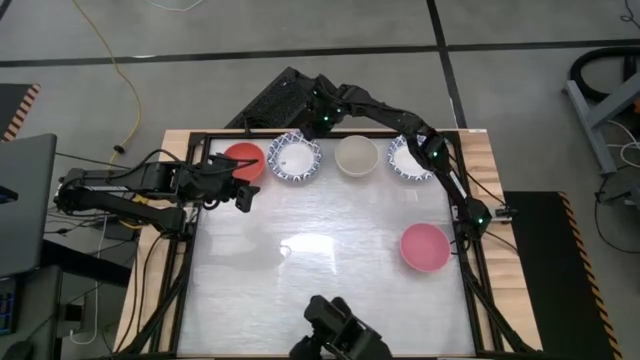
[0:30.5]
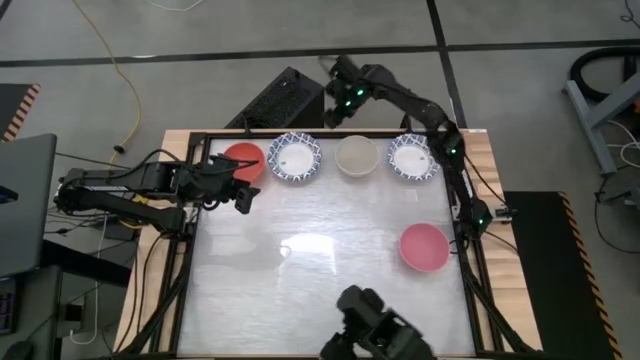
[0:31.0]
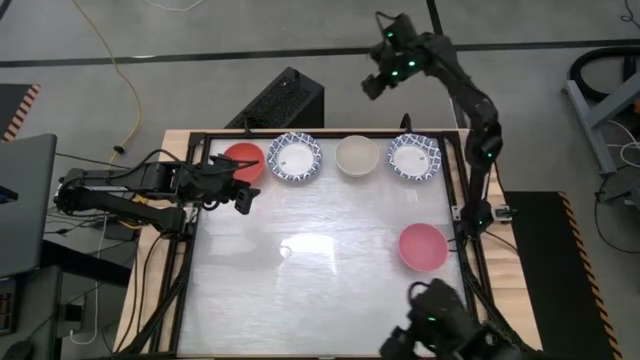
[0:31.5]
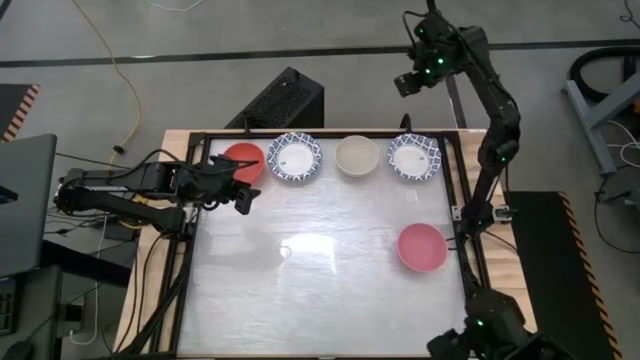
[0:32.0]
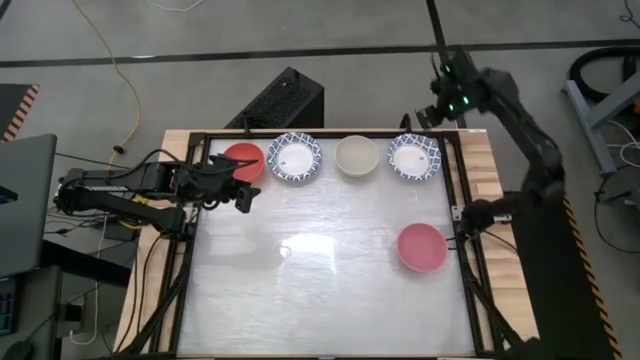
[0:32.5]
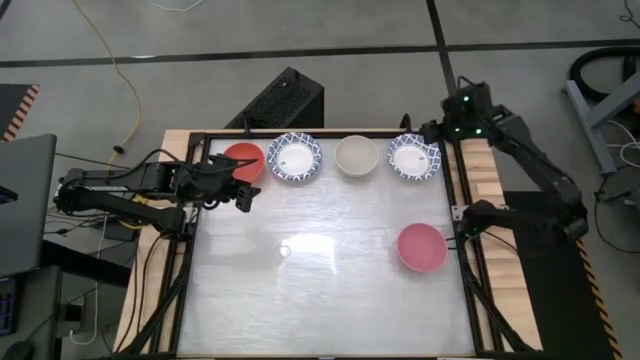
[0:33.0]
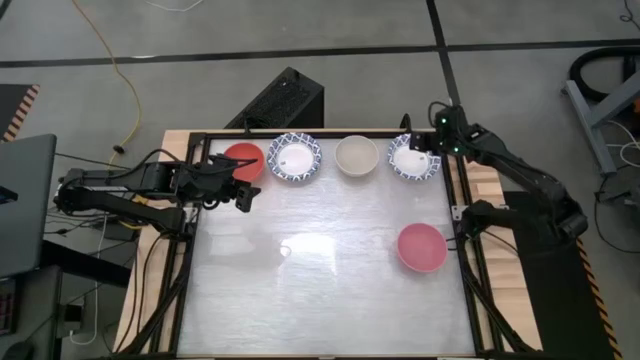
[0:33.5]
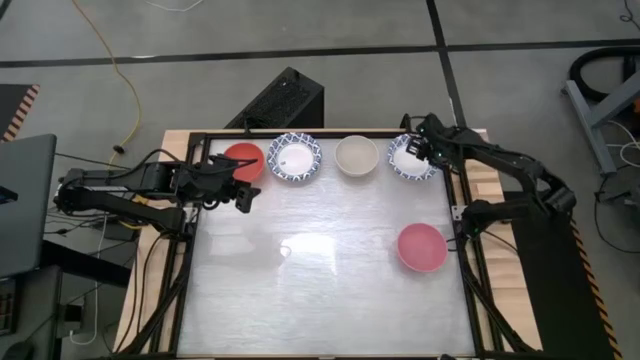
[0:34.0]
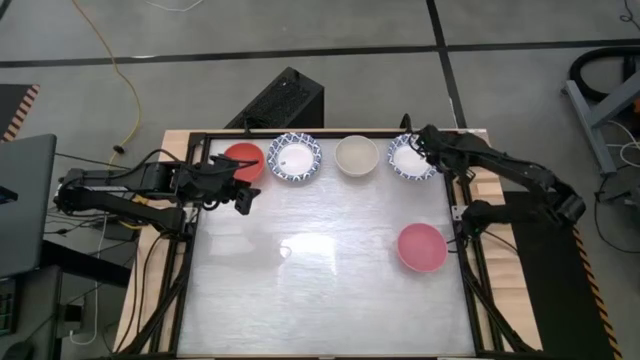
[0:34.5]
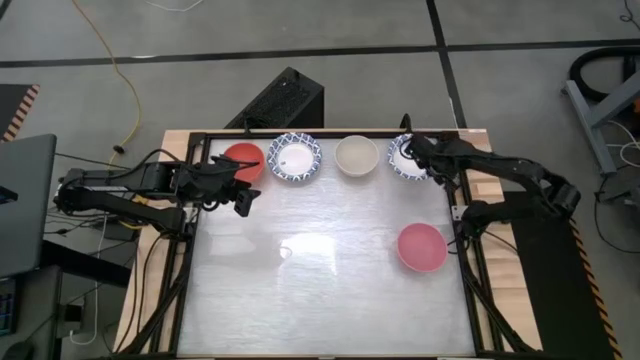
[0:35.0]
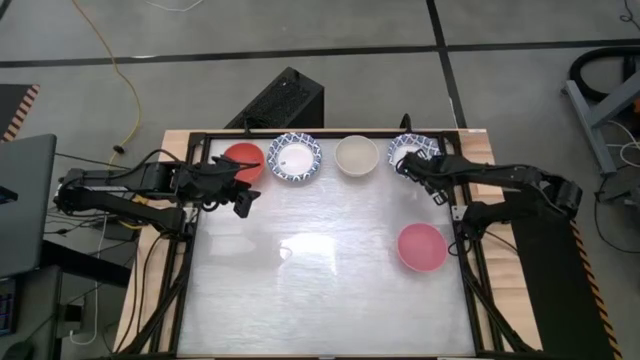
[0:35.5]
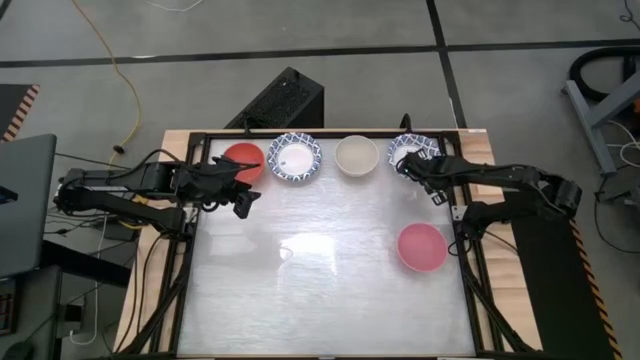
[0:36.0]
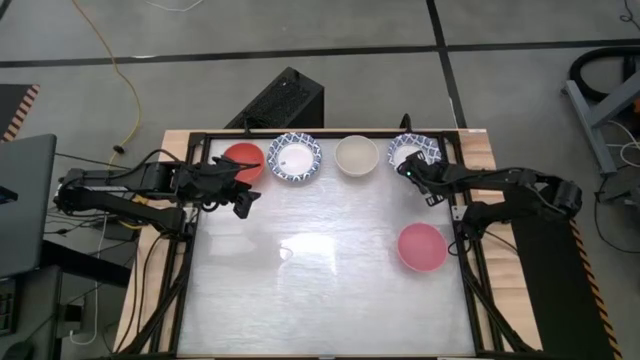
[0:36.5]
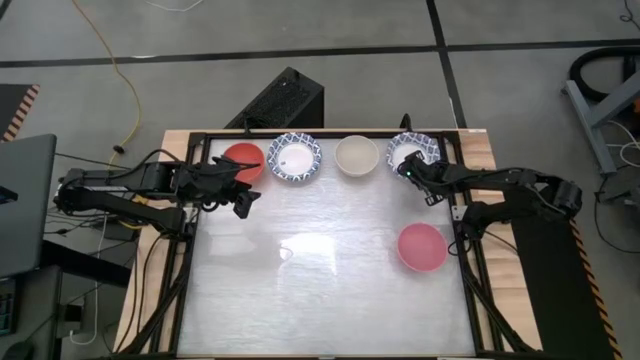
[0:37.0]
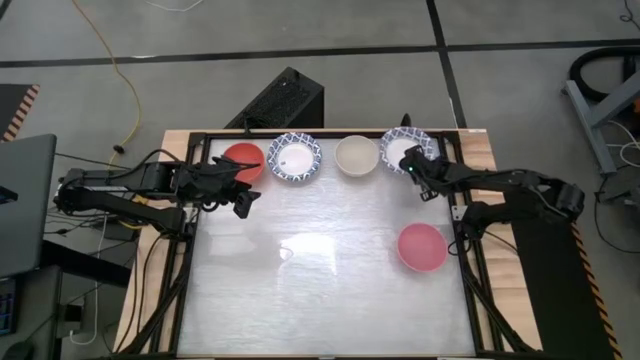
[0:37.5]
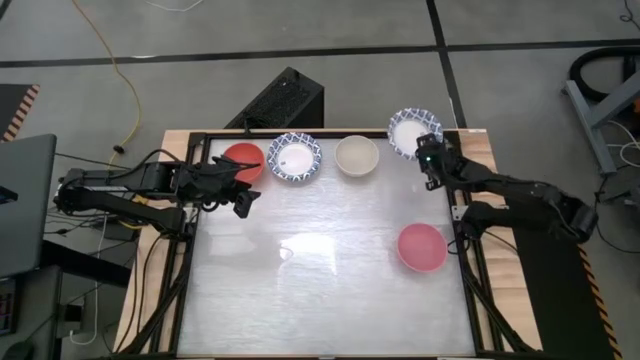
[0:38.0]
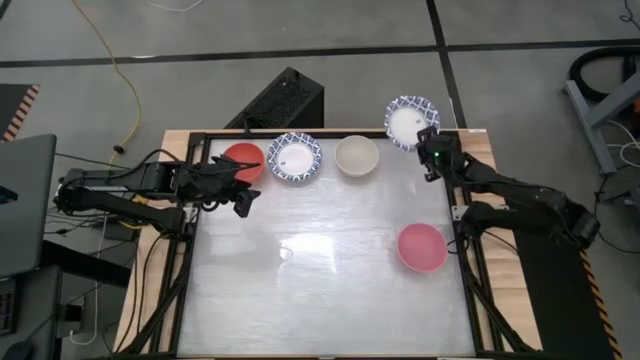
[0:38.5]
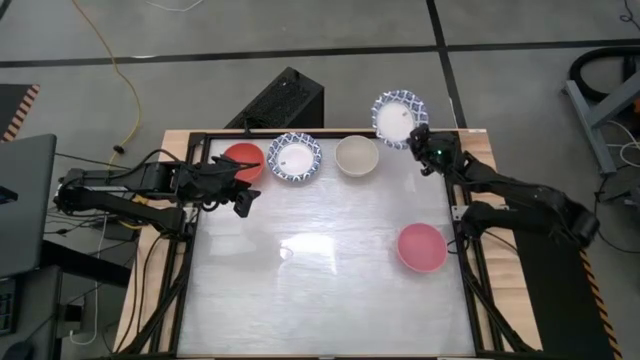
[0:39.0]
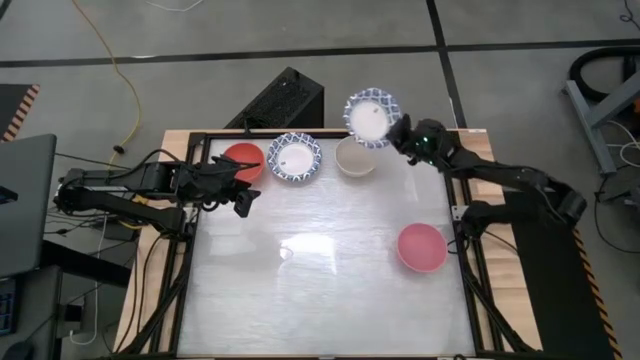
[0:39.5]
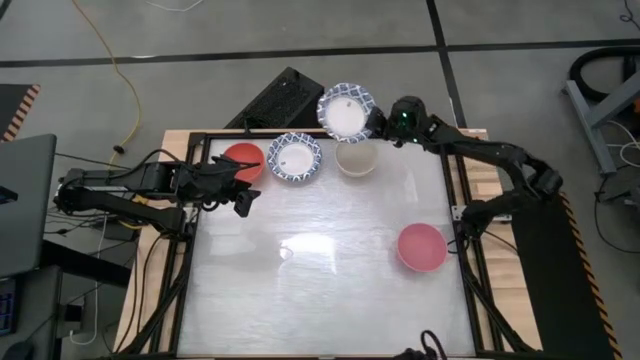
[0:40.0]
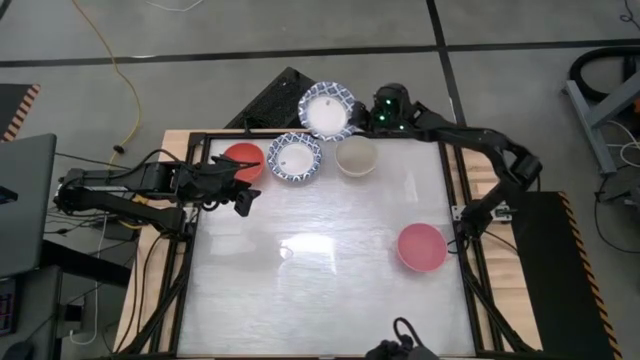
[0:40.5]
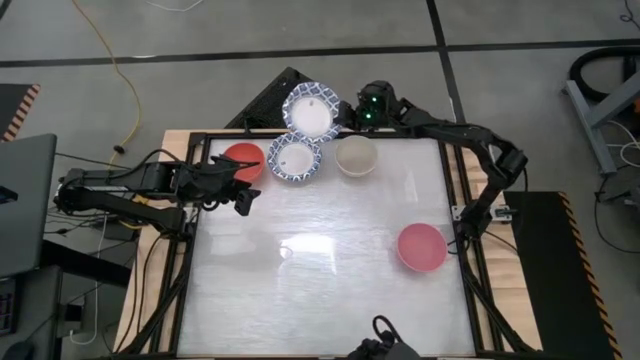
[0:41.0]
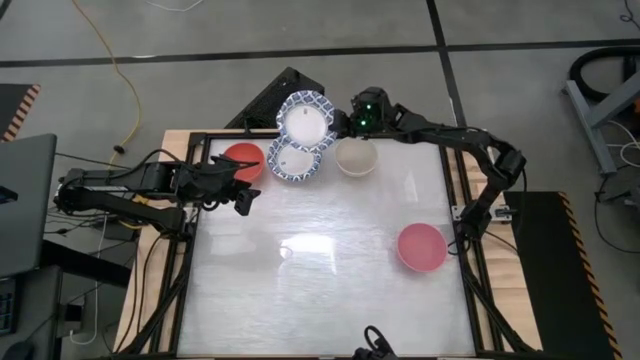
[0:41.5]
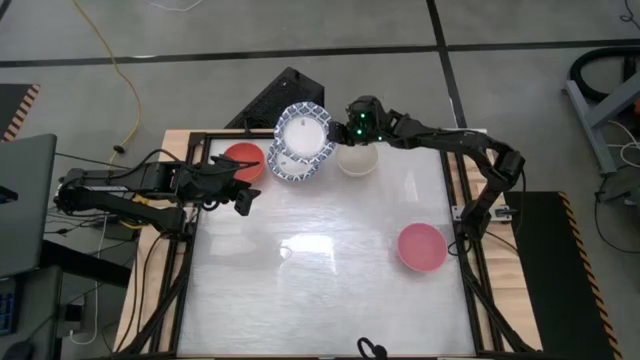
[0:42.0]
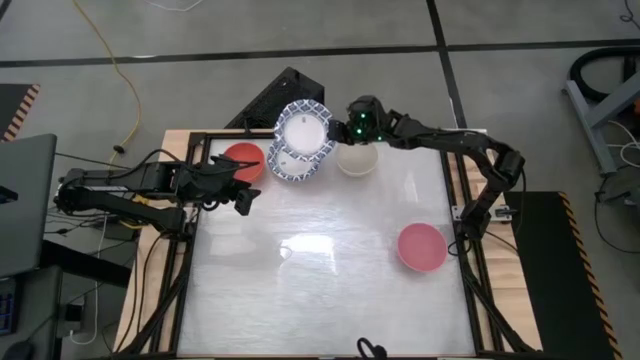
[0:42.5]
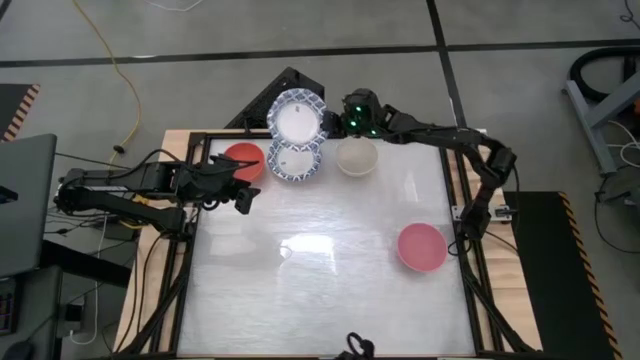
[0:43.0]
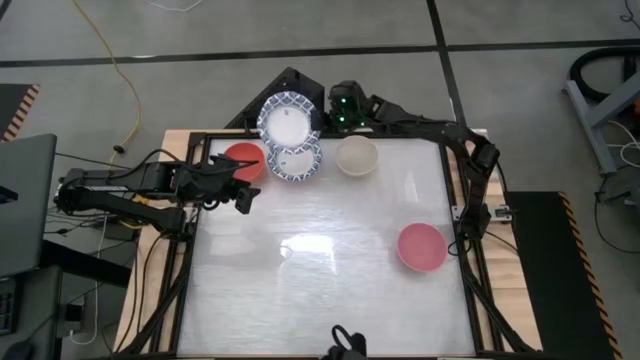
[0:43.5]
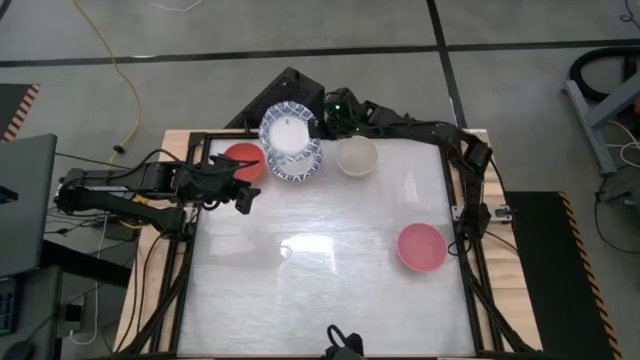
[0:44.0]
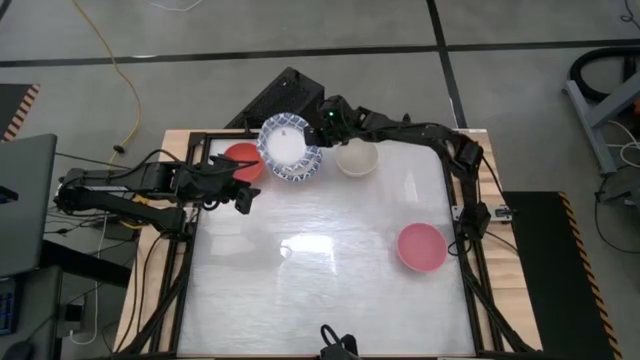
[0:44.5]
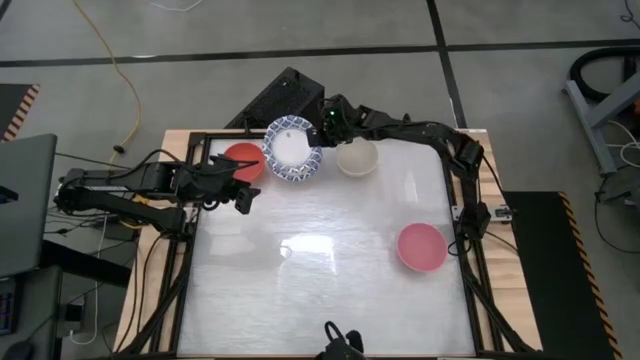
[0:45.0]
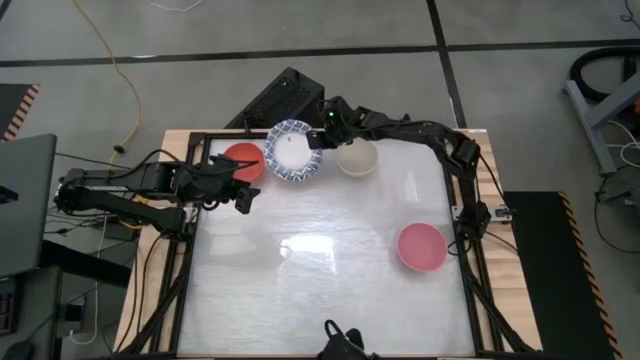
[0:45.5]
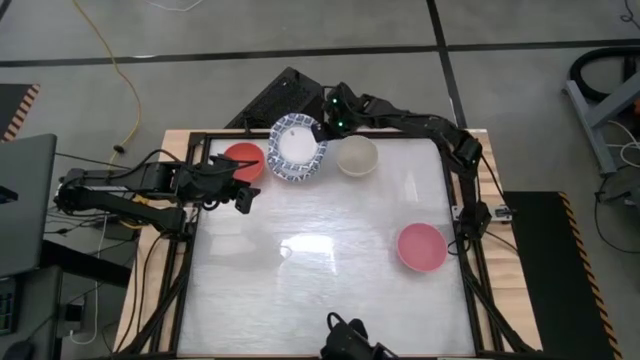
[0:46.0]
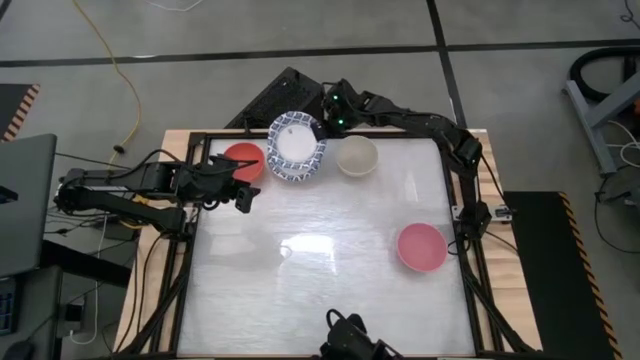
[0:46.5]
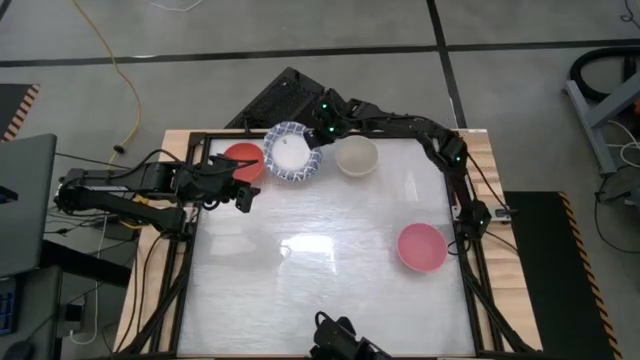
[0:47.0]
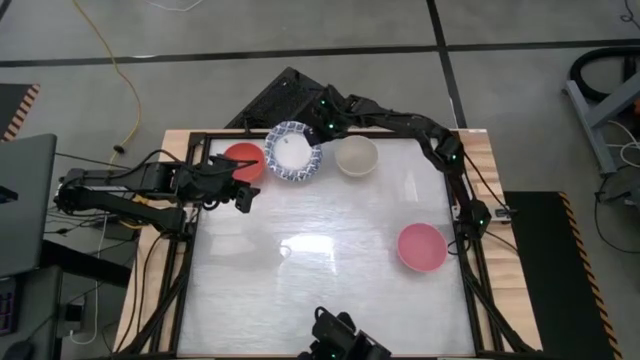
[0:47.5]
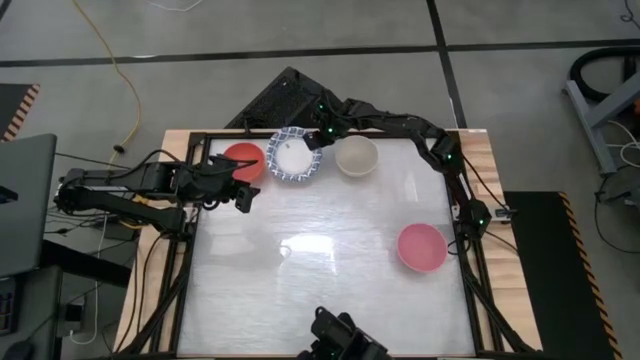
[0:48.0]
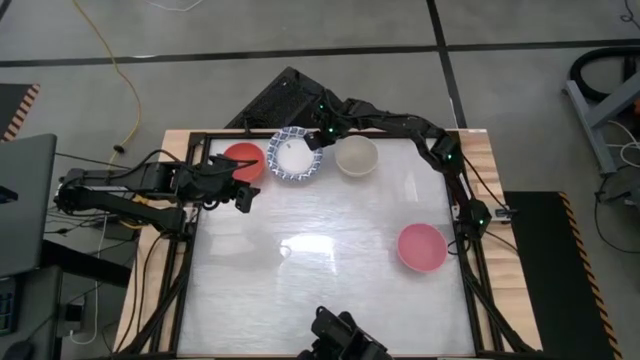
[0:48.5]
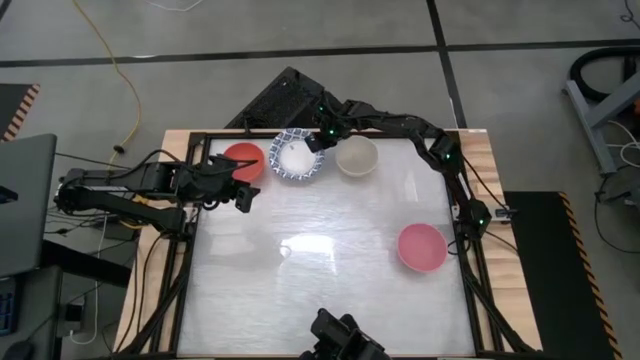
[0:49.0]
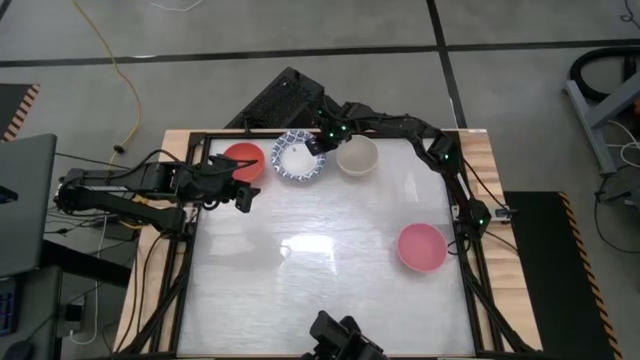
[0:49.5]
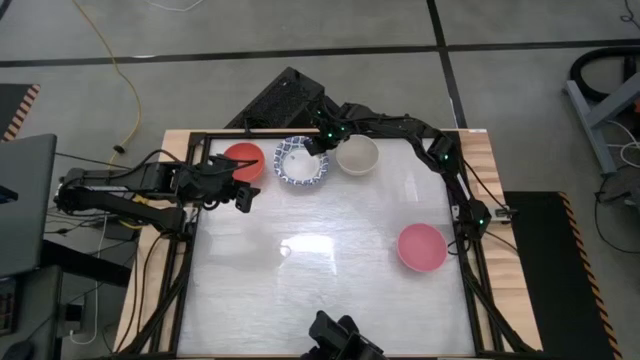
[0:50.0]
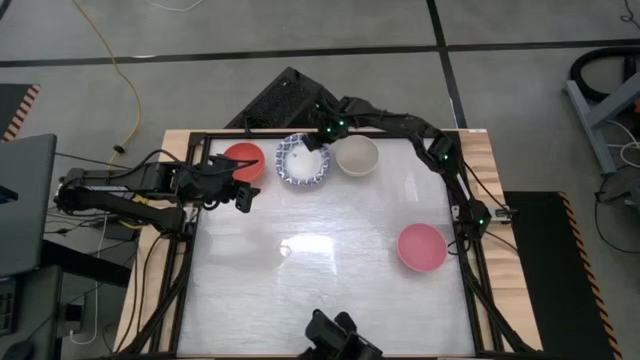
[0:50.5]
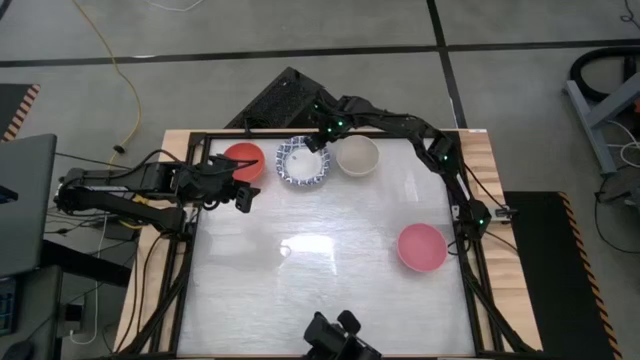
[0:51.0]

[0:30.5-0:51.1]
Stack the blue patterned bowl on top of the blue patterned bowl

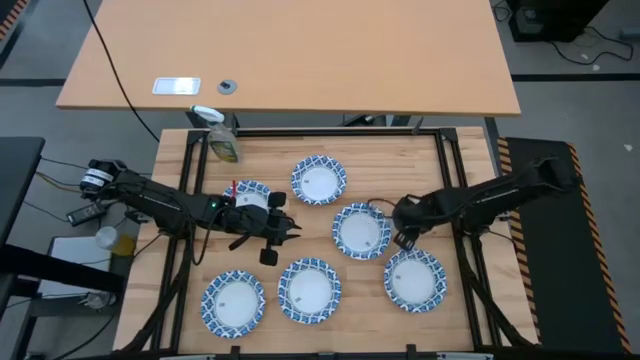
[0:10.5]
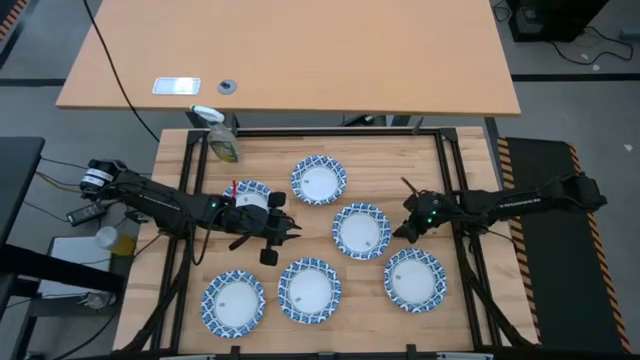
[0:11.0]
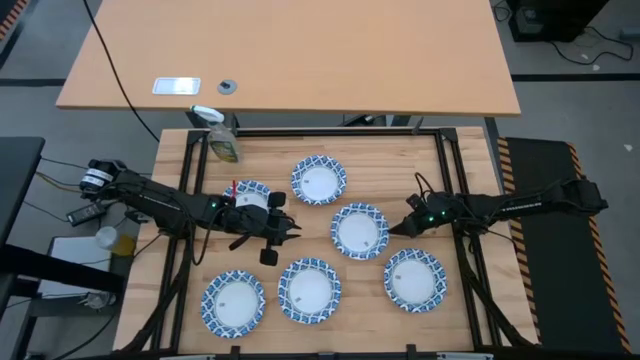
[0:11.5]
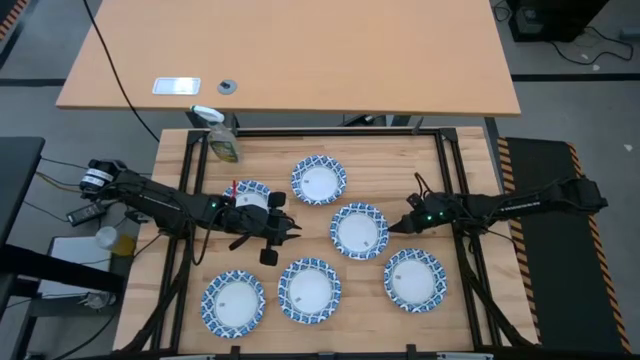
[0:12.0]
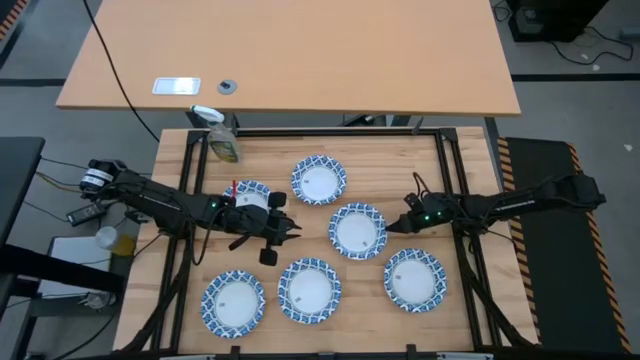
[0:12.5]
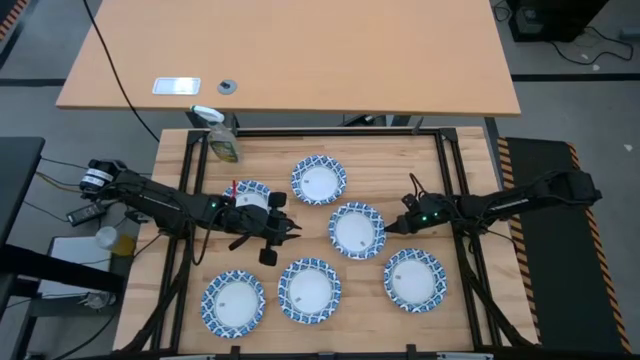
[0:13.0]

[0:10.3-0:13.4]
Stack the white bowl on top of the white bowl
